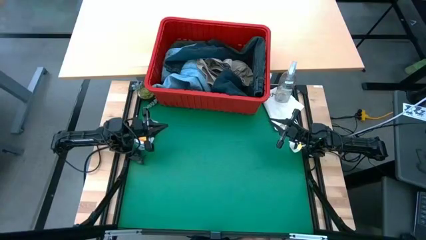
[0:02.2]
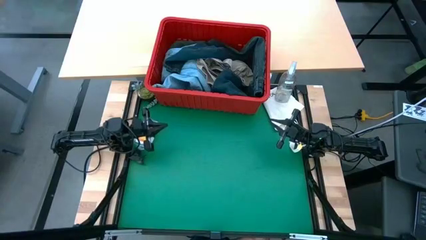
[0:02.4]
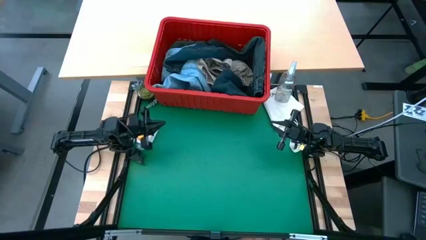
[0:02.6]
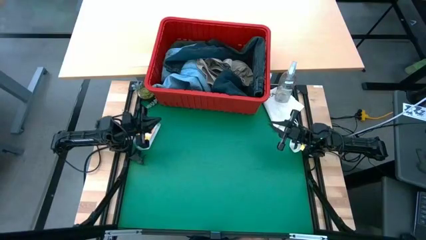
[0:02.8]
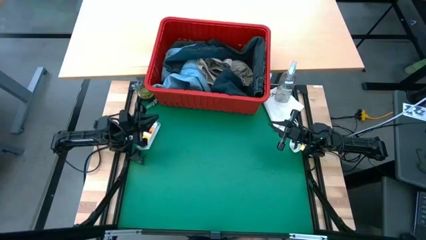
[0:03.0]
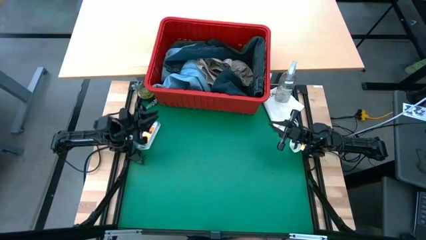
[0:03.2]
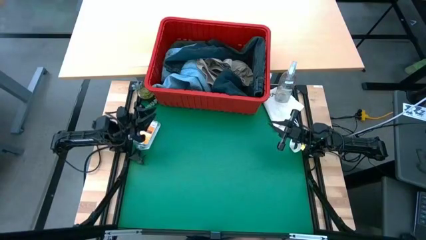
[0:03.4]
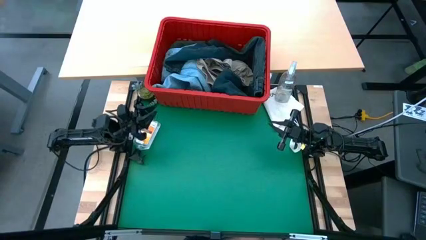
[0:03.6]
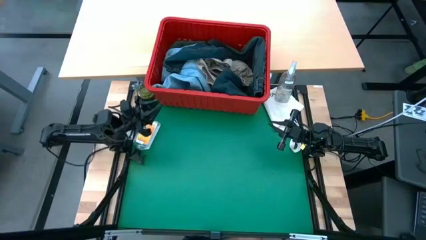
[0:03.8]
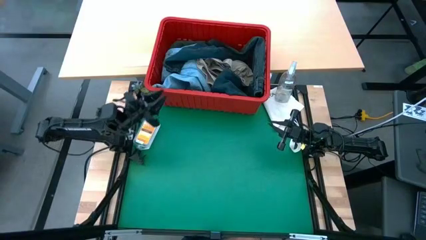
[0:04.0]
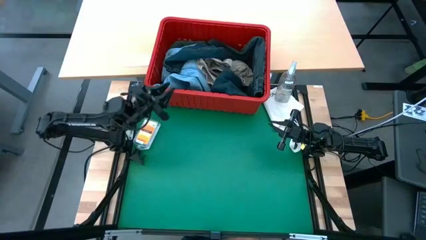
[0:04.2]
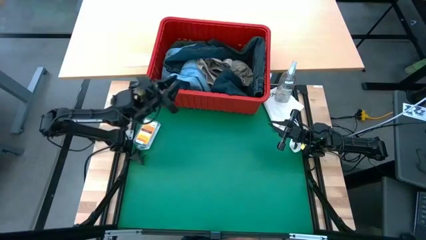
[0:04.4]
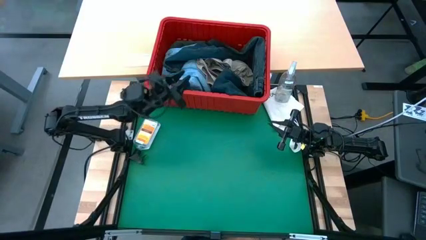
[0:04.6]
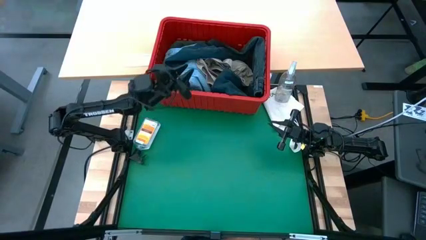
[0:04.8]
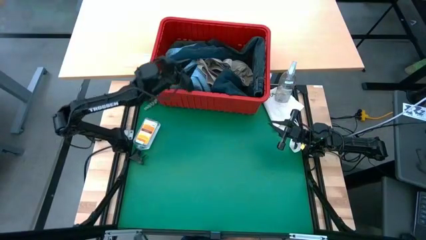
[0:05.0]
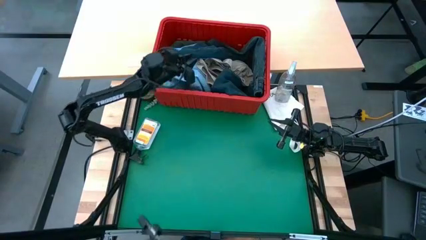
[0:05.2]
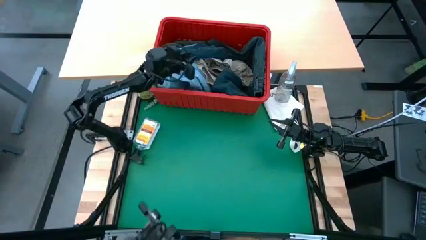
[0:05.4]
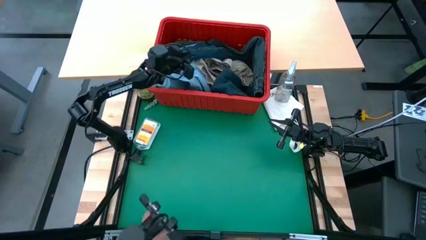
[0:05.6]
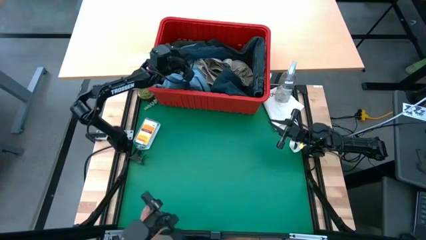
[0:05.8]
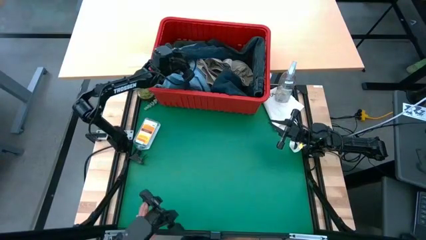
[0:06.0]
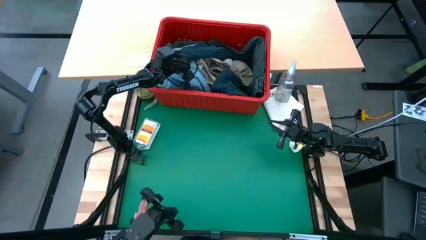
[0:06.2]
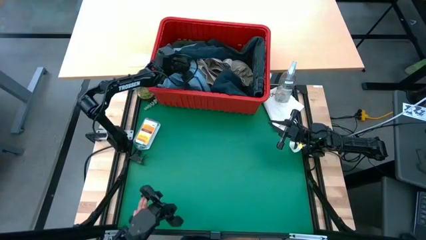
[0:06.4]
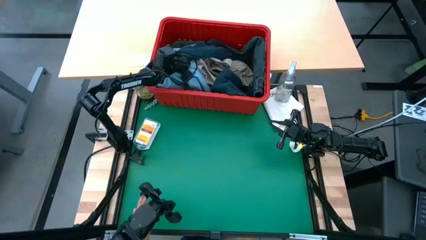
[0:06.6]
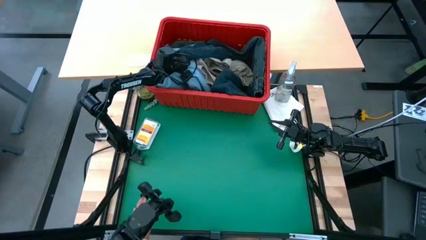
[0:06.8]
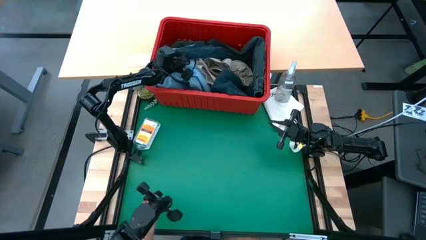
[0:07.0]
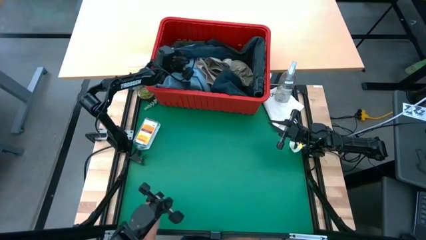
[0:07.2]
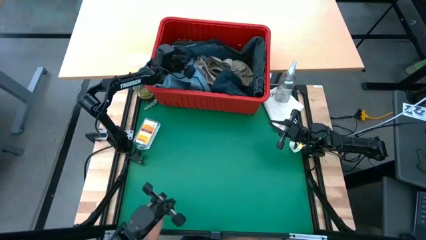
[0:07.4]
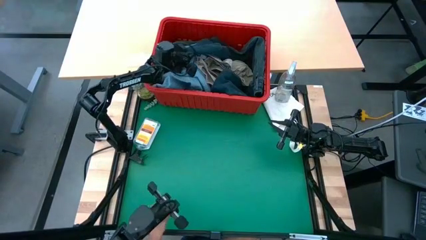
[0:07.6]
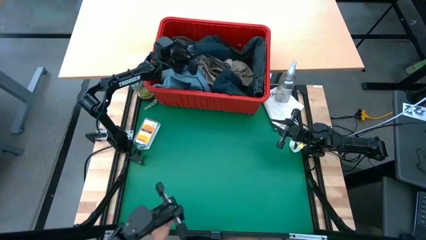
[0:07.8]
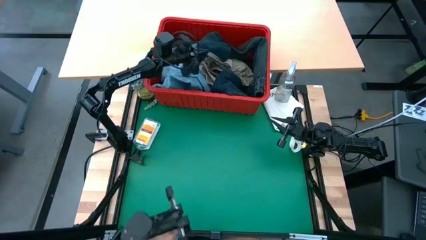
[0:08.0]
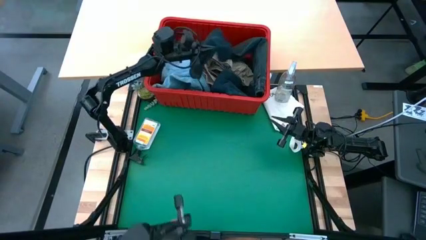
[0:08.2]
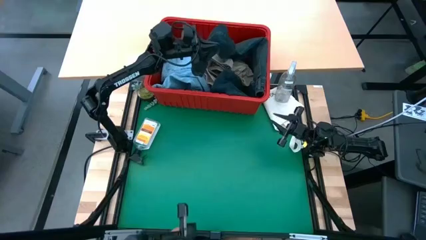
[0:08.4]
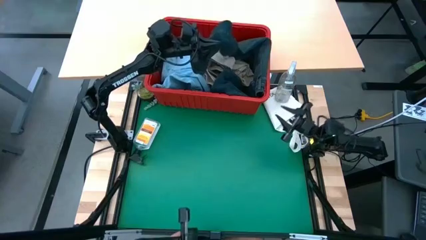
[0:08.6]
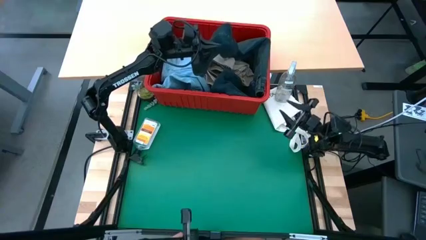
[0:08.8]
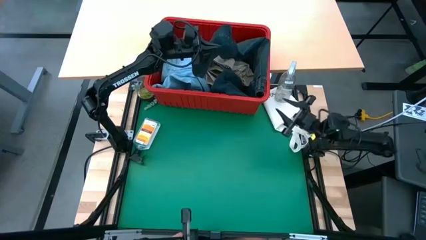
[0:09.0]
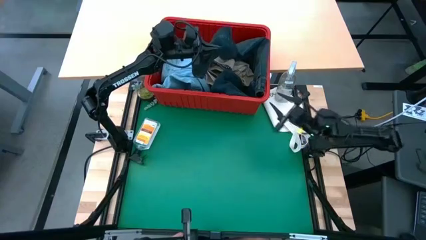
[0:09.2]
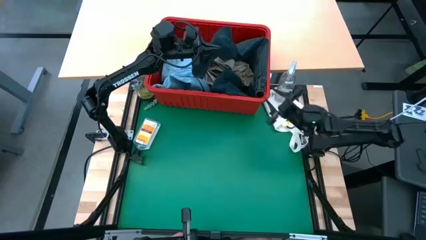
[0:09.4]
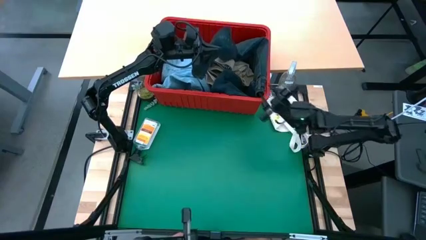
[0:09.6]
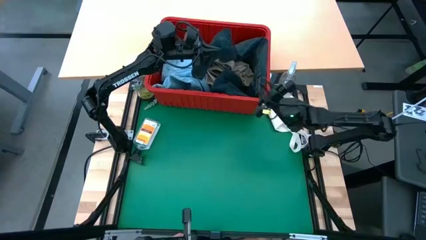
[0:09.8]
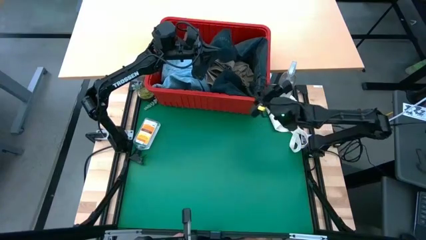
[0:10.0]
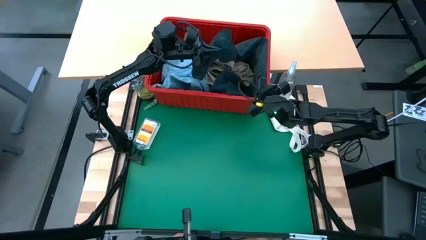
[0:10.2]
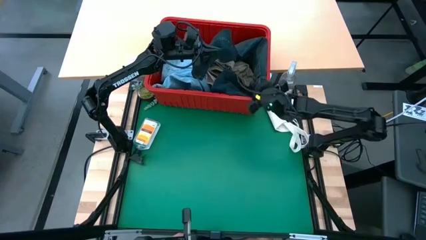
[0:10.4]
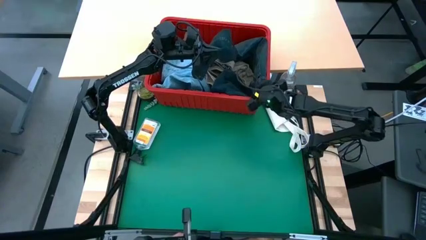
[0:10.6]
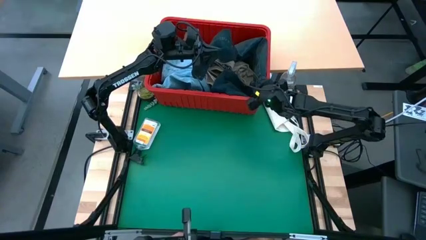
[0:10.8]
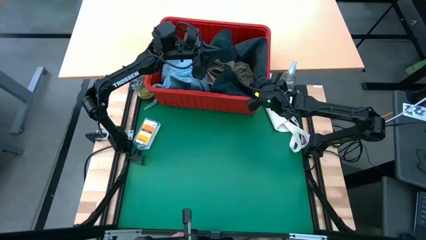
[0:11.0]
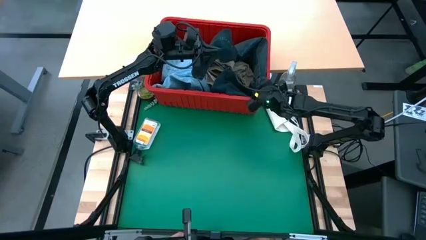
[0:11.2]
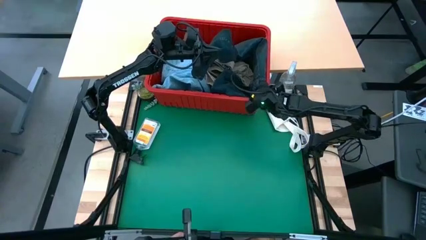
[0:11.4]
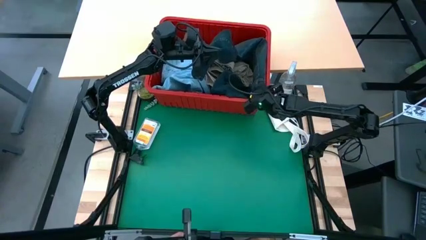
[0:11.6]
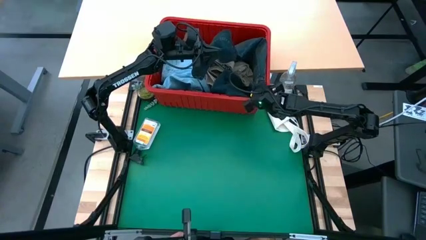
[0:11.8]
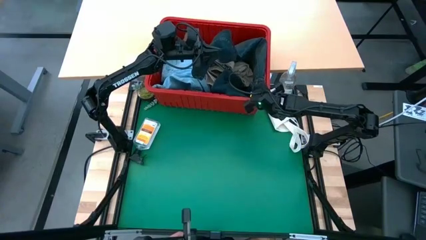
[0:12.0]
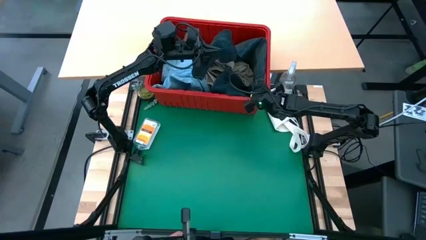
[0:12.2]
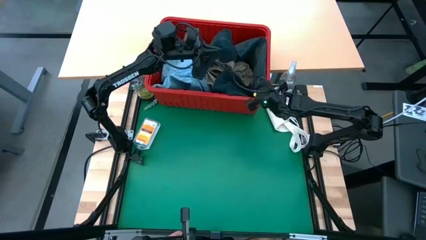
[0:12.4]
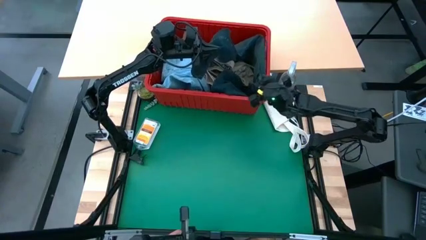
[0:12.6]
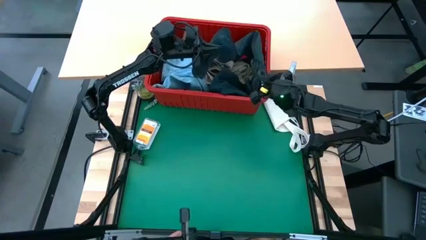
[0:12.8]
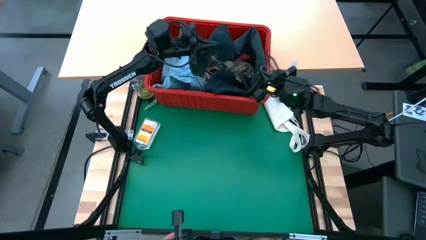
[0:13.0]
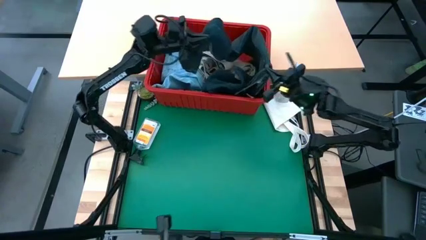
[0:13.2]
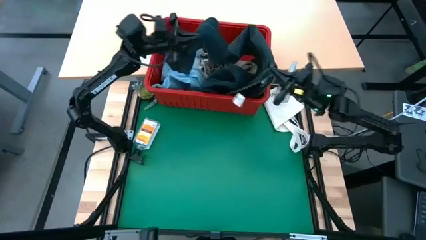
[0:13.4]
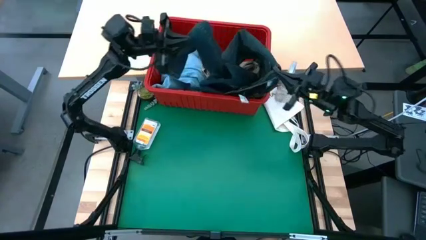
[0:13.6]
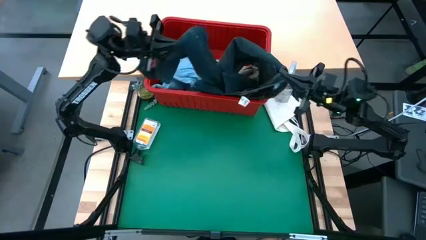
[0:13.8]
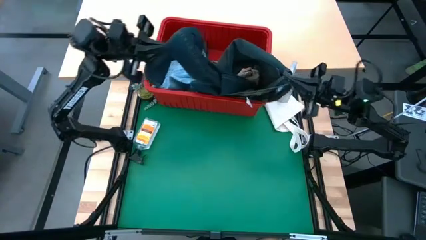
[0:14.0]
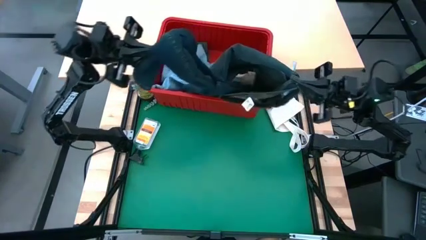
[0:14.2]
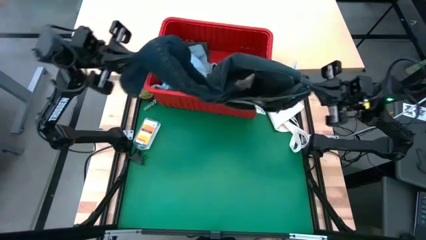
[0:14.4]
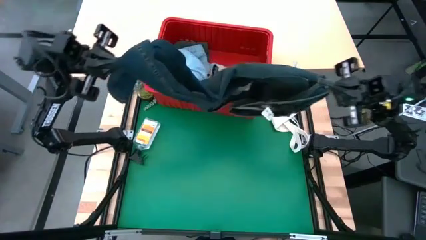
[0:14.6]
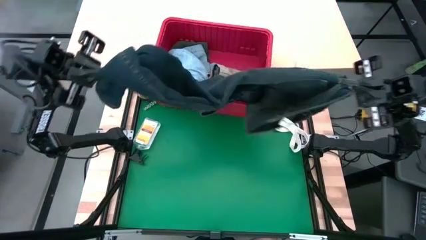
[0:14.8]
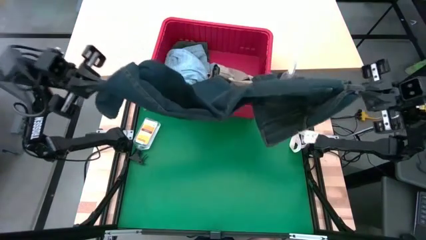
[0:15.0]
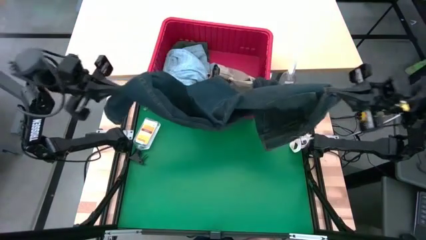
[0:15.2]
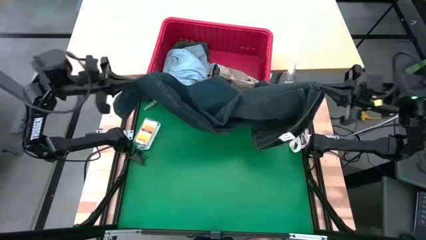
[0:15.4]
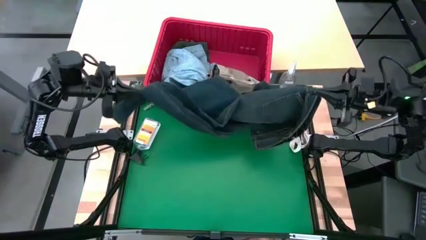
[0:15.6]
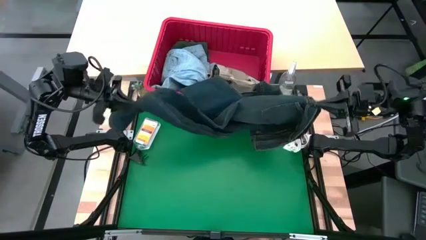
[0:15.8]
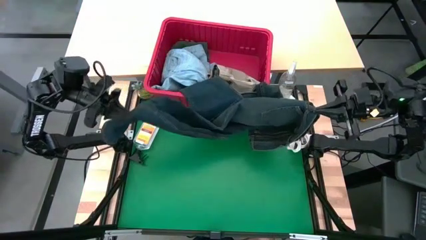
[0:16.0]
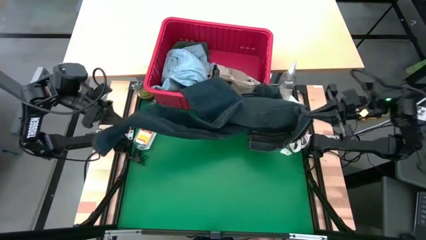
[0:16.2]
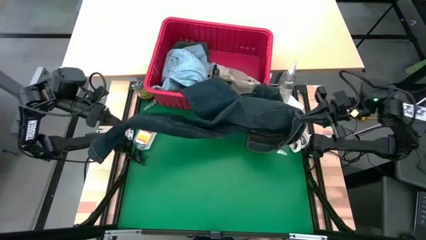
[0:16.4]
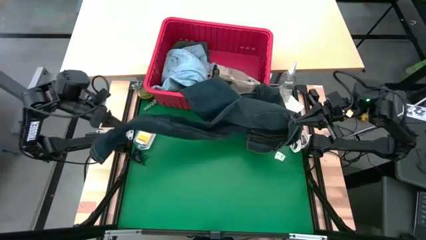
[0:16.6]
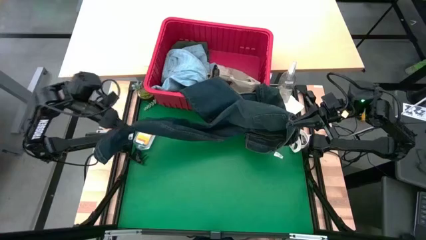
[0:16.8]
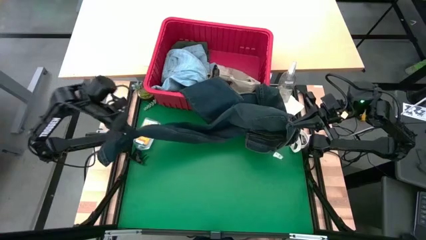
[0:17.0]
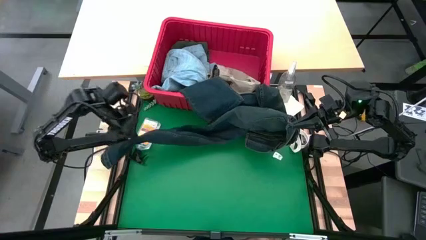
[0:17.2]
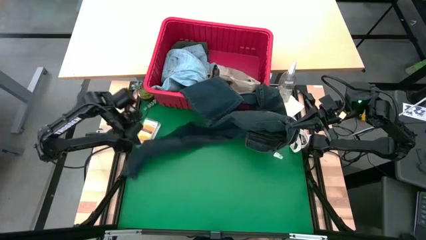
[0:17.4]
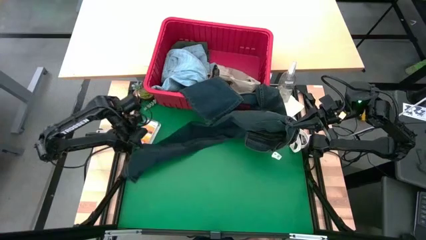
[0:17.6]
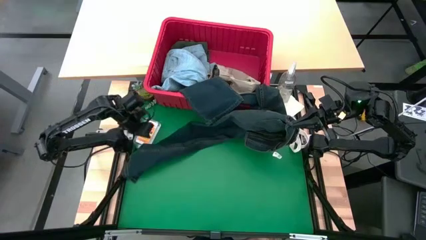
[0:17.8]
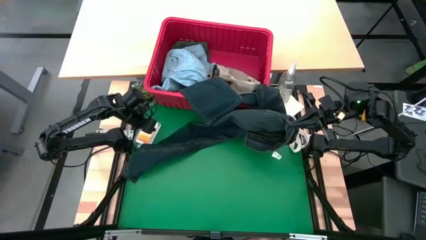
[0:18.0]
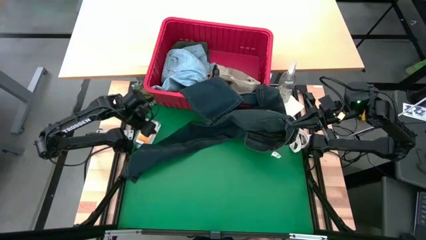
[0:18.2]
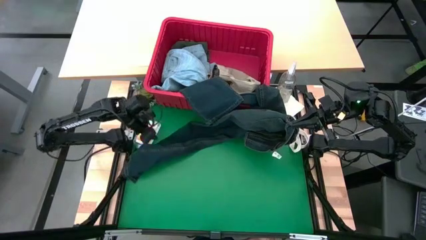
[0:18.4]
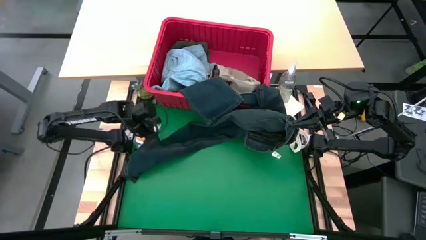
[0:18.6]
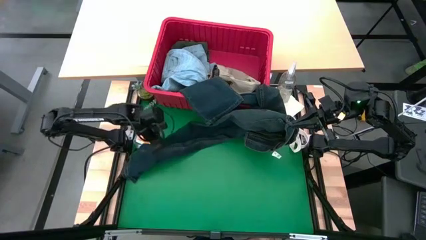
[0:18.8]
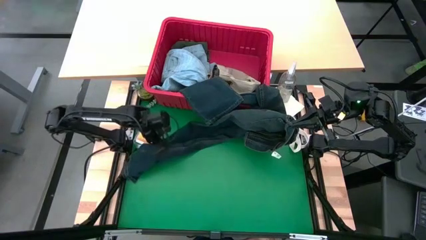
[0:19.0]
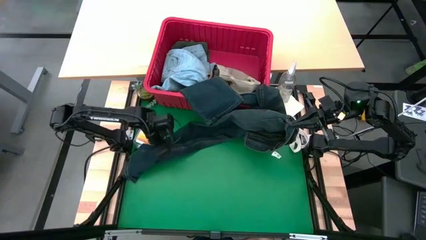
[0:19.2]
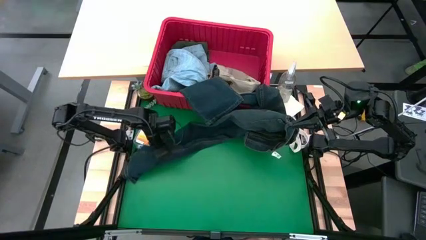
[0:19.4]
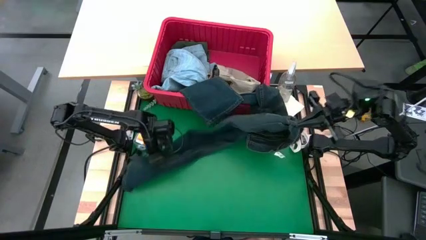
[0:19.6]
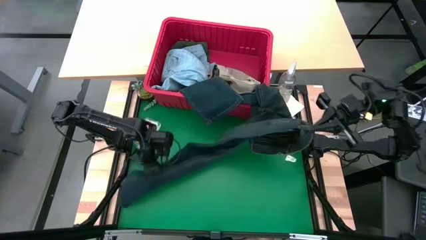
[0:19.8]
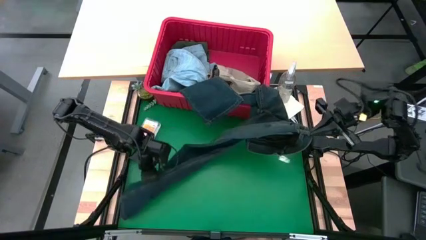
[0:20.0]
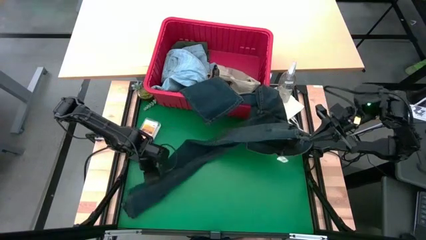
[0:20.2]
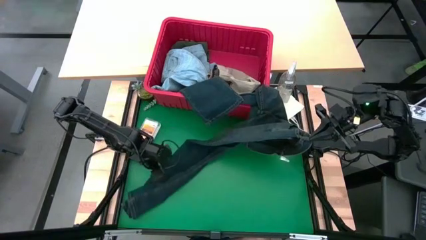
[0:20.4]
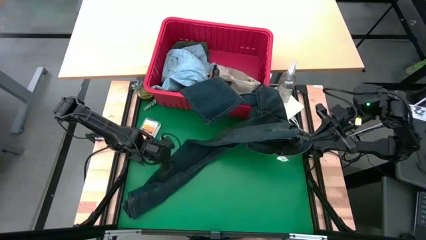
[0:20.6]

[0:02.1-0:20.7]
Task: Fold laundry
Fold the dark blue jeans
